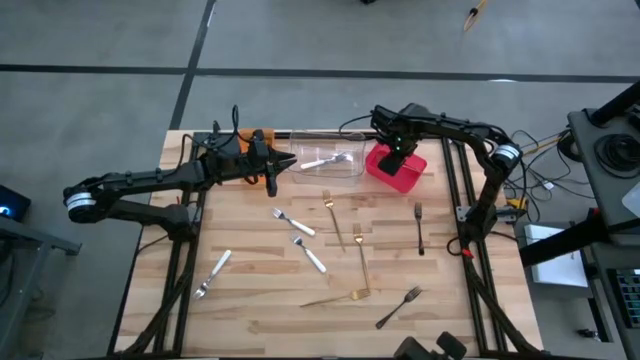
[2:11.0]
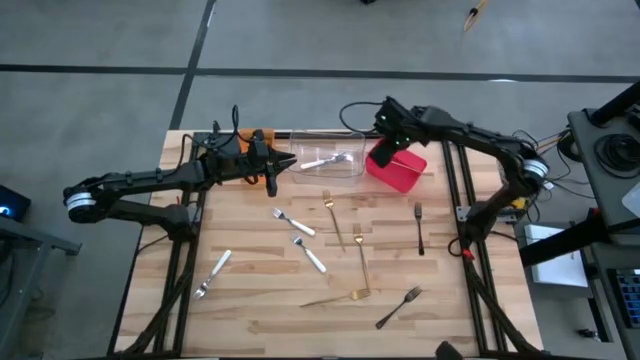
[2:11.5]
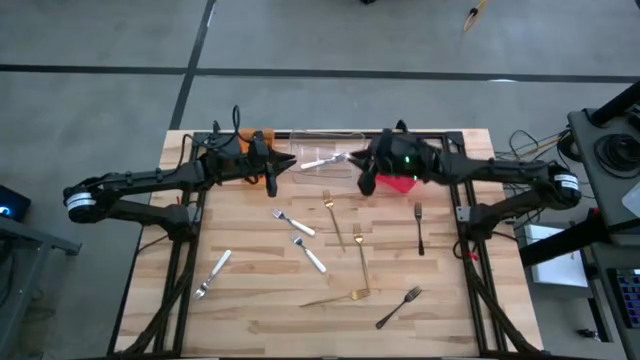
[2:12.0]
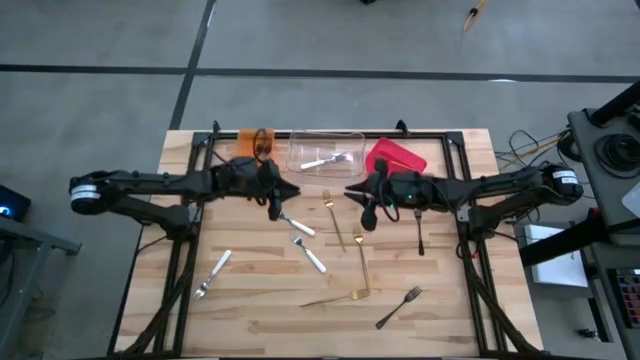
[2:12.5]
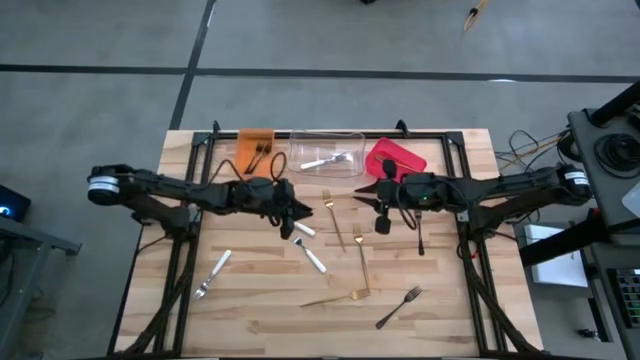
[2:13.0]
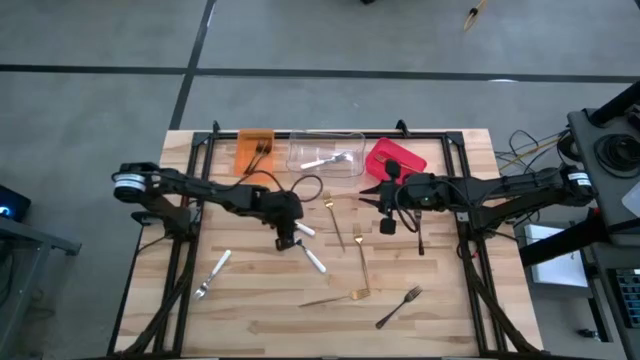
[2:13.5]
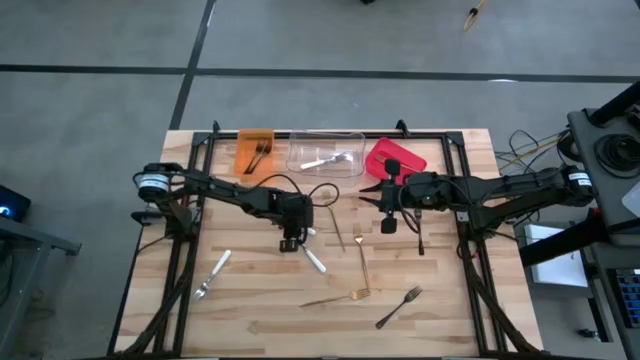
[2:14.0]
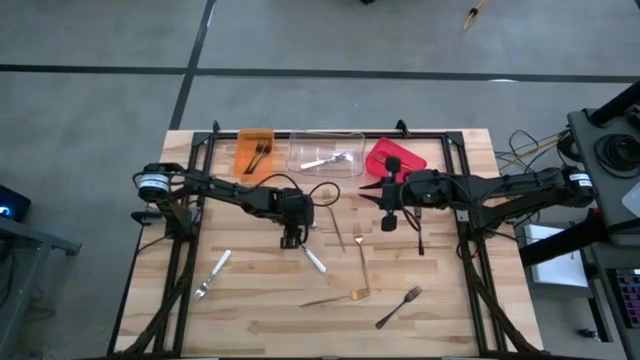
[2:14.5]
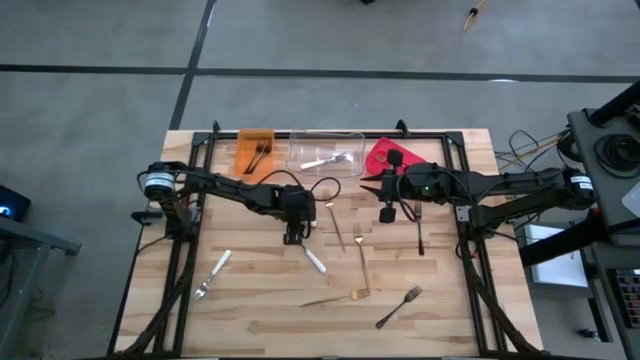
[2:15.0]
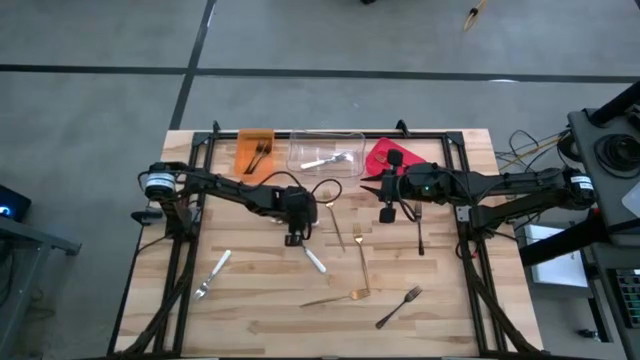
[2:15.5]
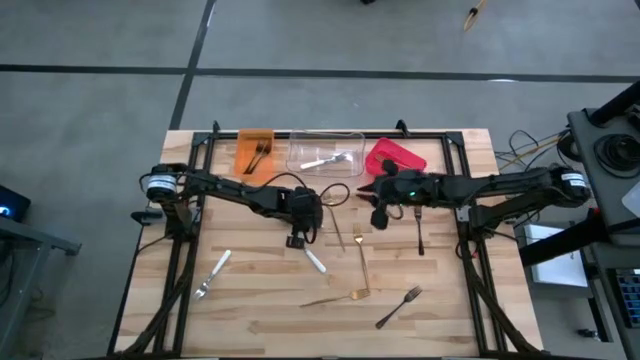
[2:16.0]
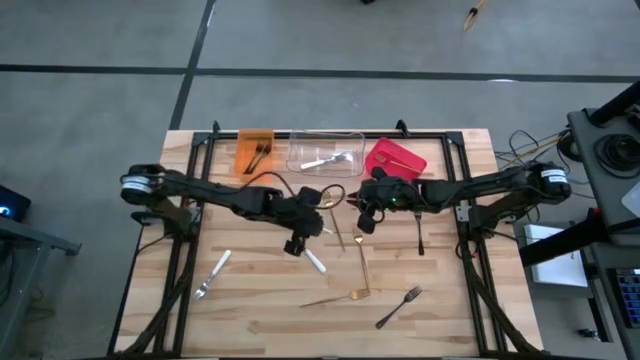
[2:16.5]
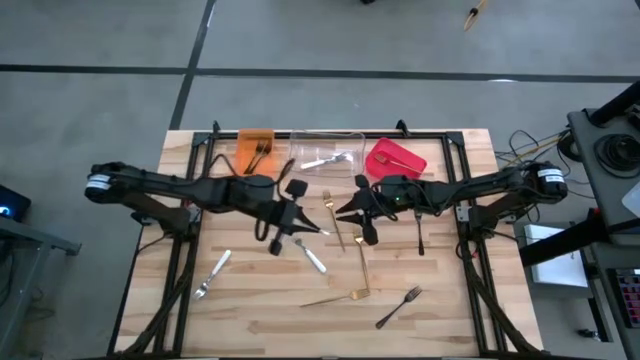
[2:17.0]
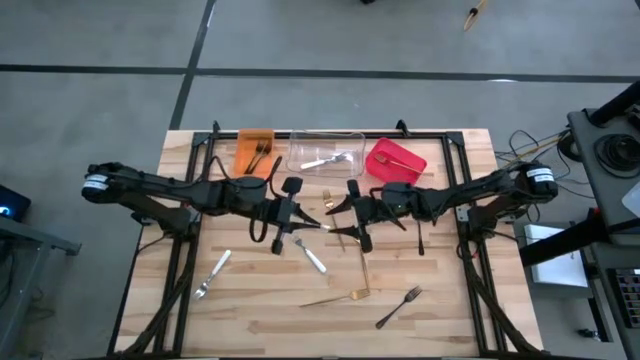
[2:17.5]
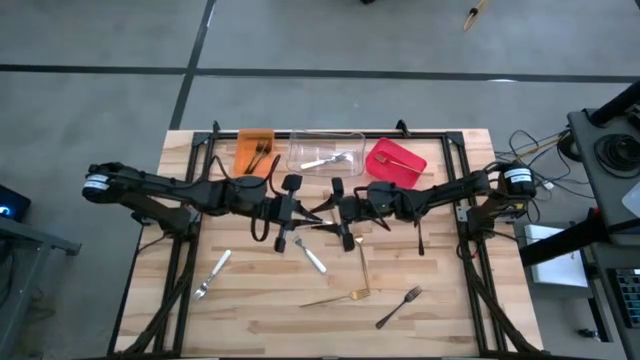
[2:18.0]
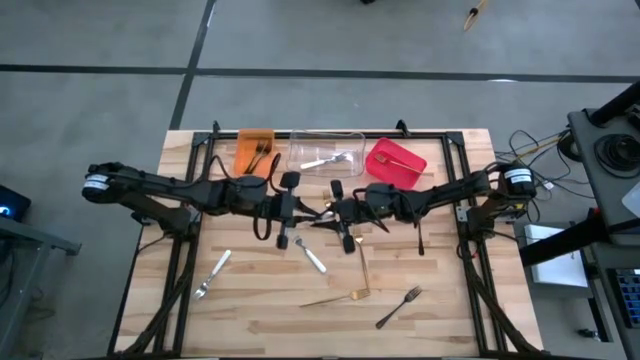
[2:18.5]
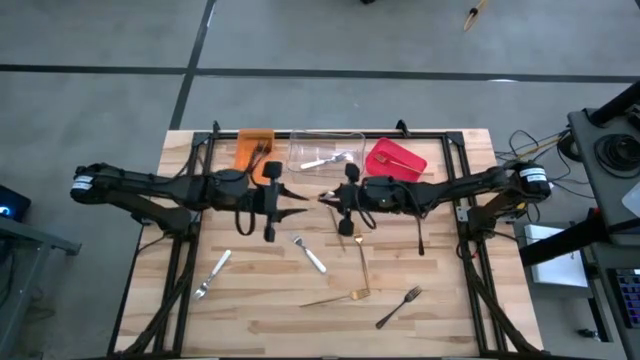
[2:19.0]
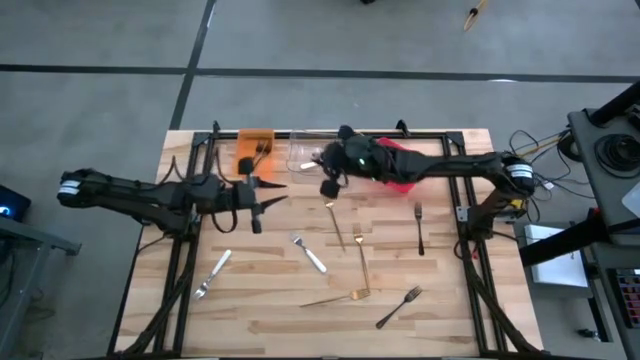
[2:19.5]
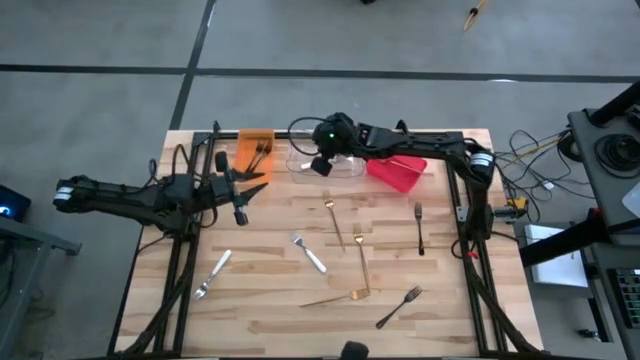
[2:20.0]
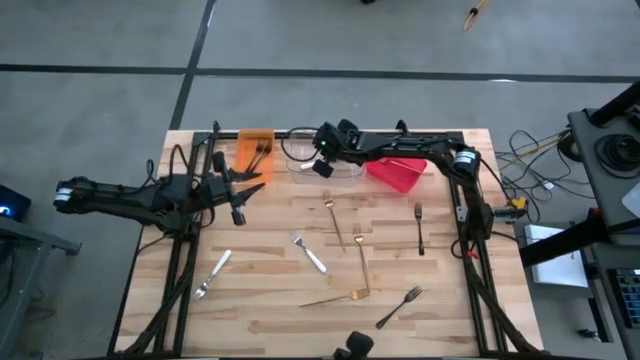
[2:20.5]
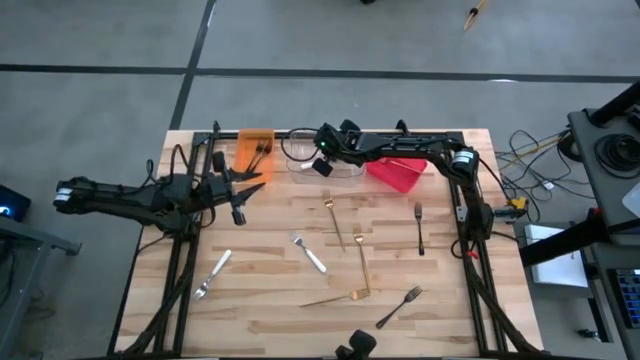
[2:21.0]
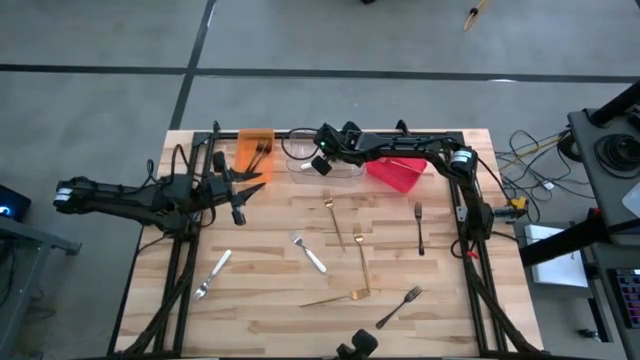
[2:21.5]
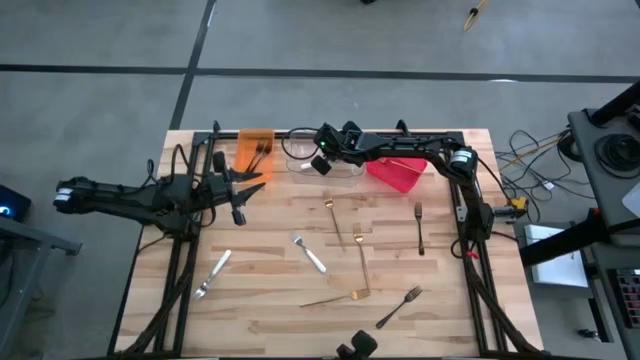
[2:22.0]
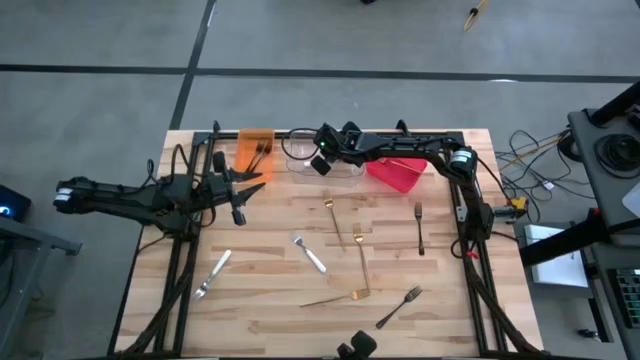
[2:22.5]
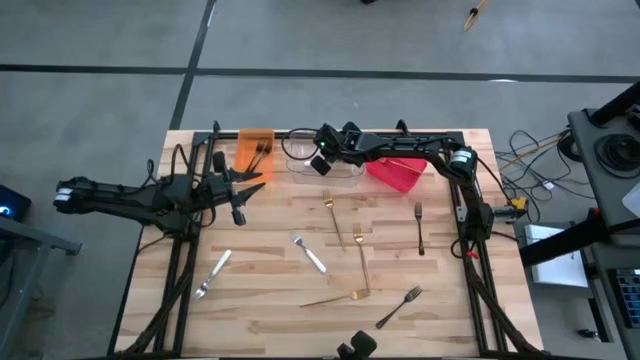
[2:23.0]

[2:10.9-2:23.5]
Task: Sort silverware by color (type)
Put the white fork into the transparent bin

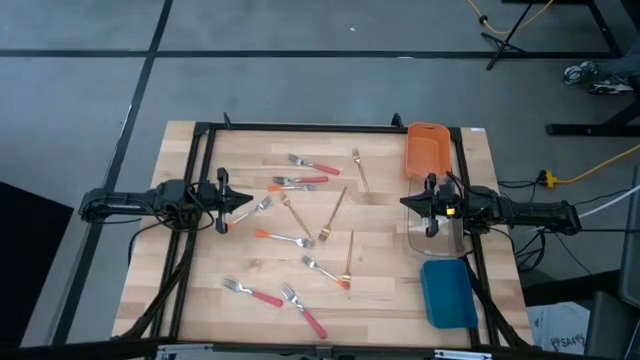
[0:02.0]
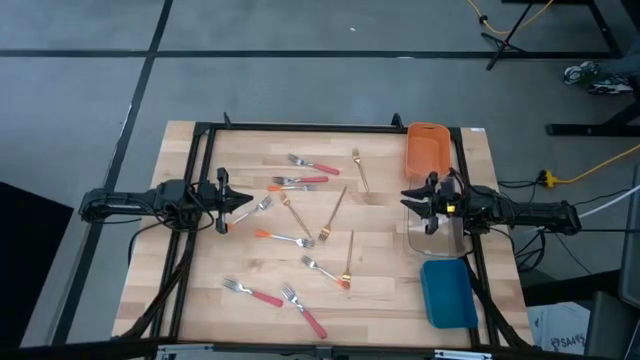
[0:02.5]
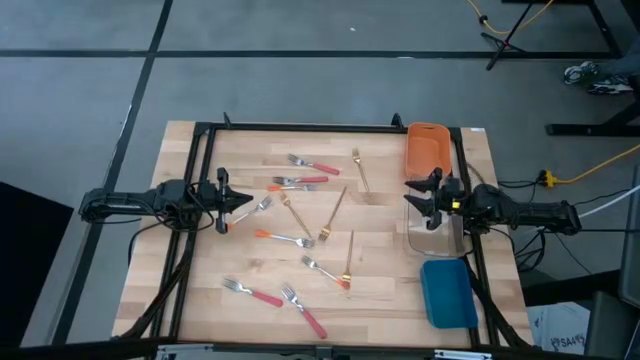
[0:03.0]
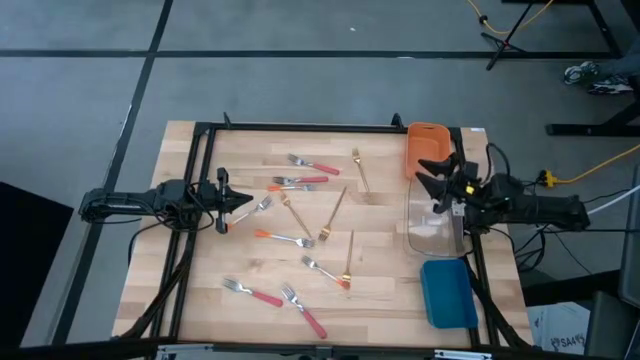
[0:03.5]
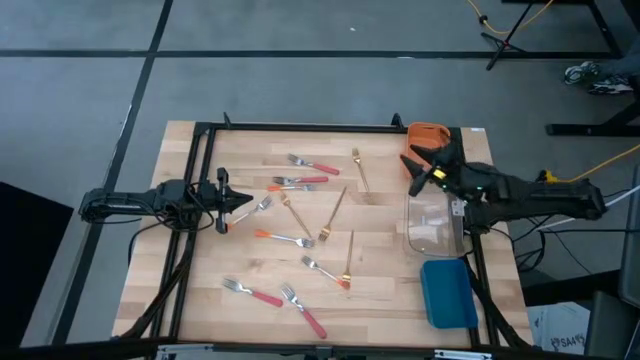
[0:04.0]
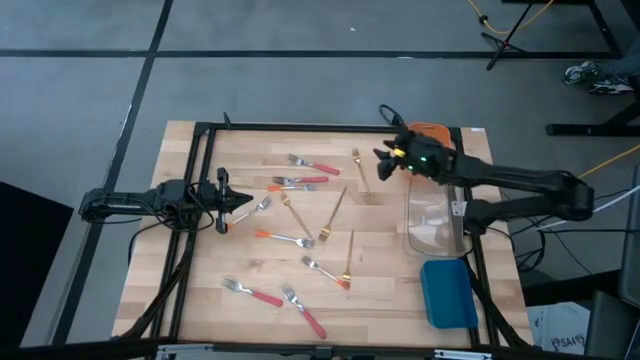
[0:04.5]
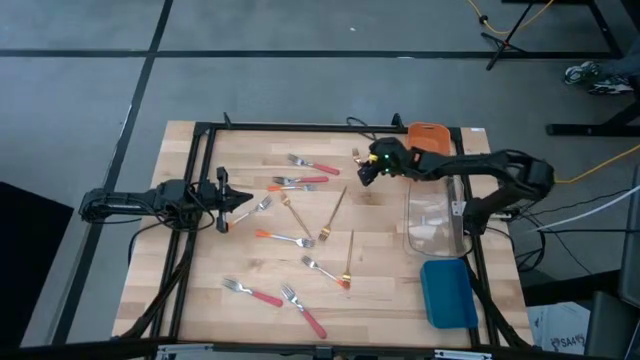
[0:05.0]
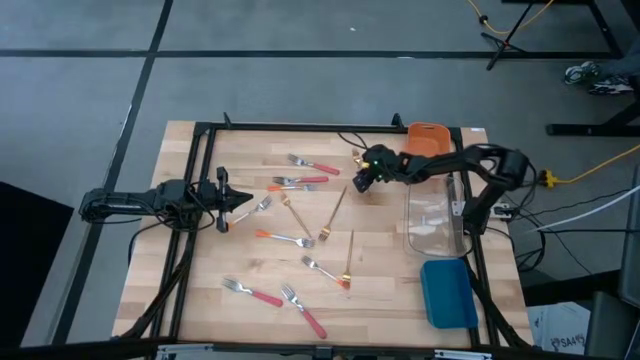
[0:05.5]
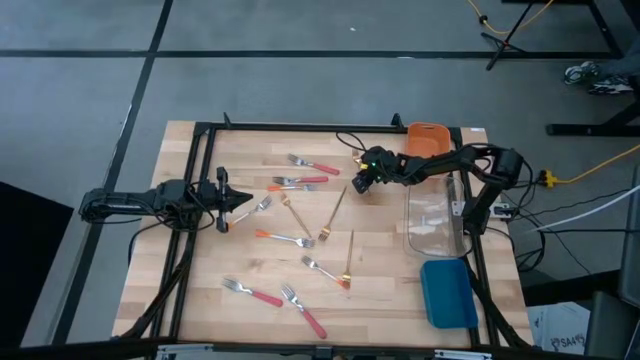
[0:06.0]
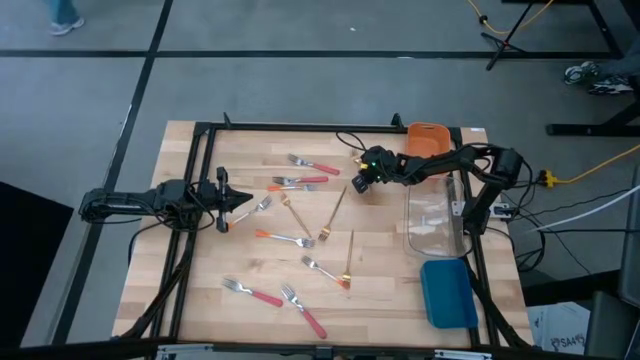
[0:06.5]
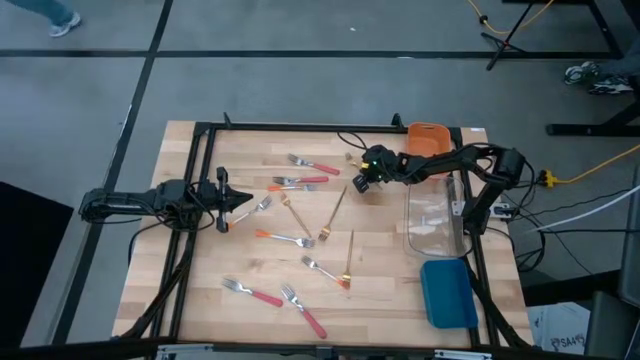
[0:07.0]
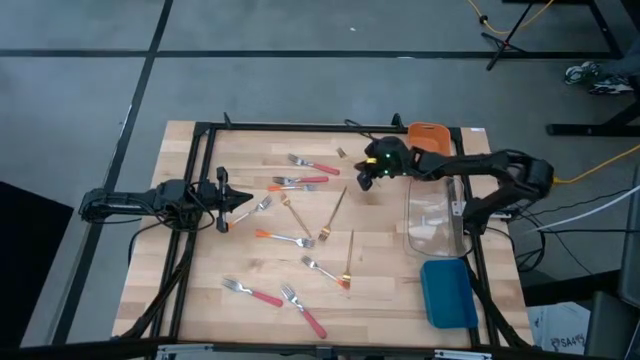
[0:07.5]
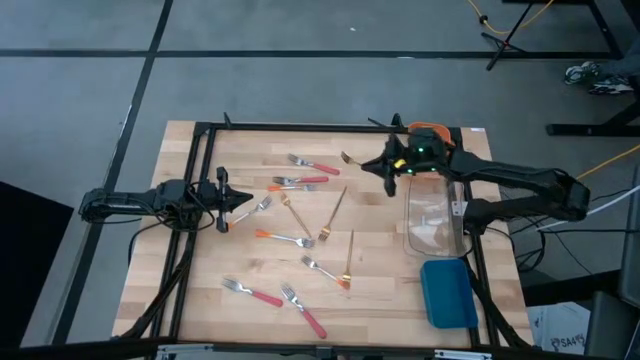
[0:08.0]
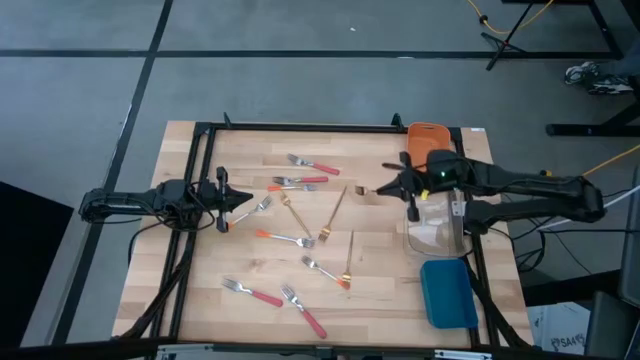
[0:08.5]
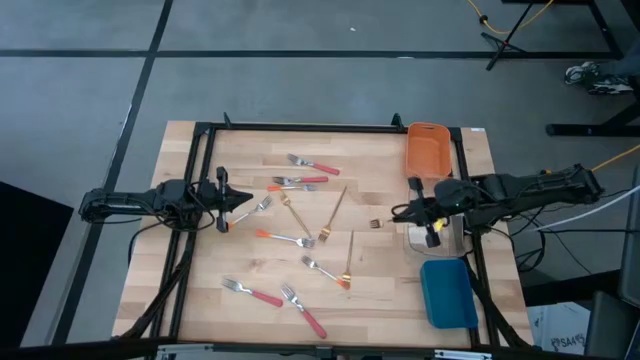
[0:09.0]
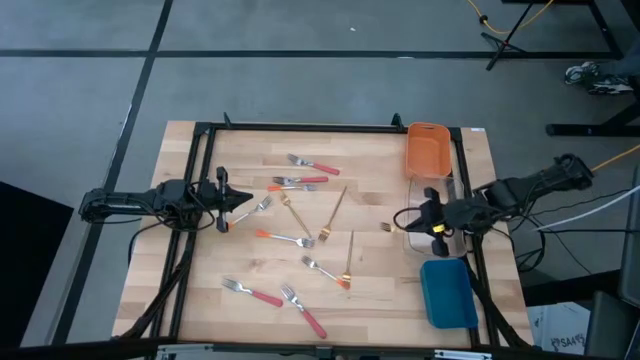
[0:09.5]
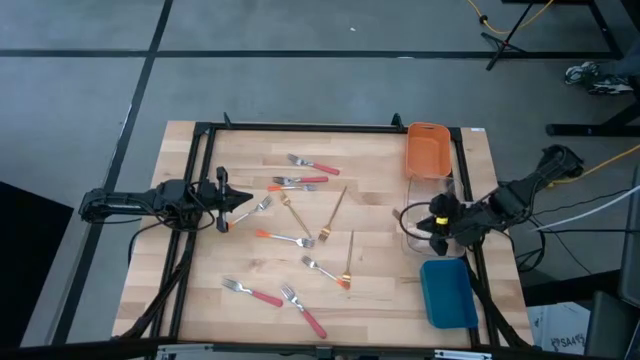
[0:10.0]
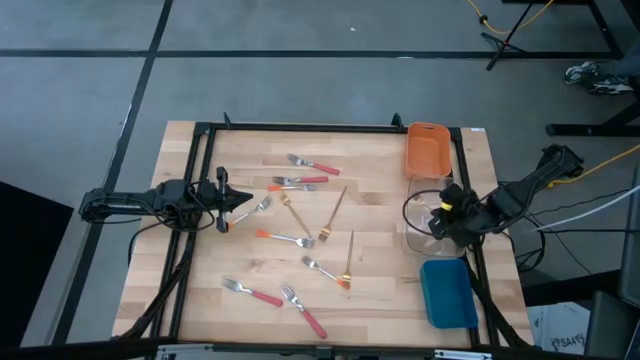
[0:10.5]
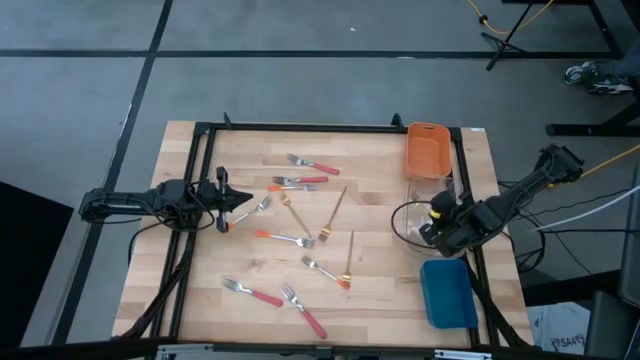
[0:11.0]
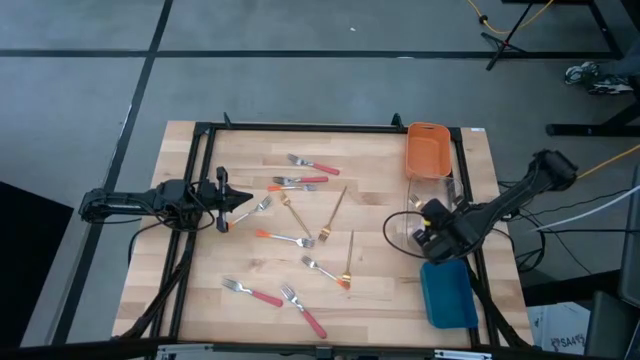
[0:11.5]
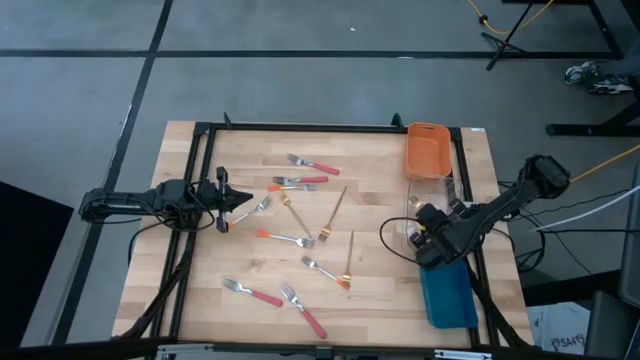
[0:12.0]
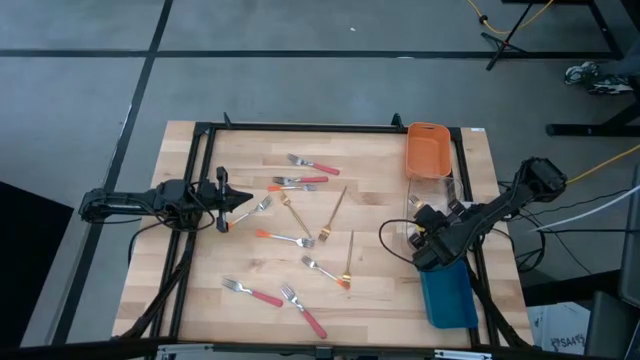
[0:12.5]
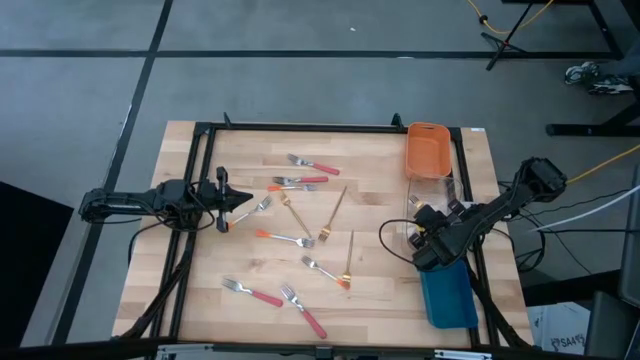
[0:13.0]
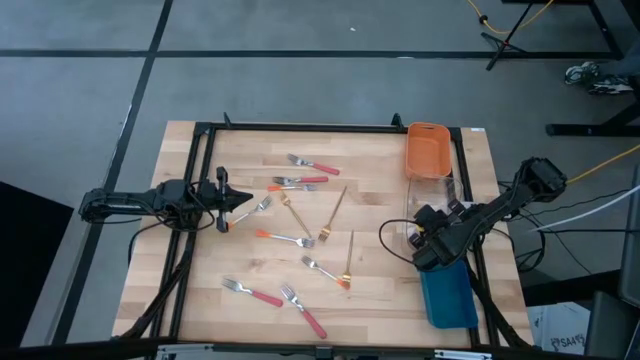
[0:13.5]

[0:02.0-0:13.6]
Task: Sort silverware by color (type)
Put the gold fork into the transparent bin
